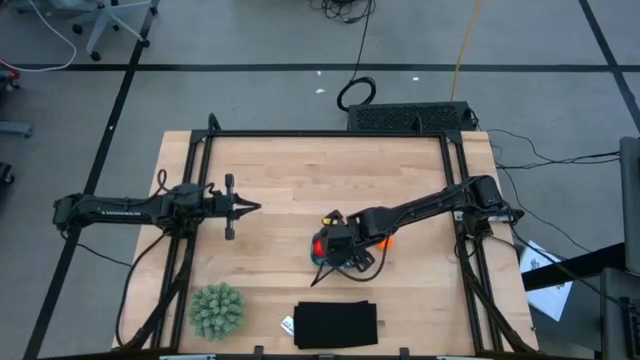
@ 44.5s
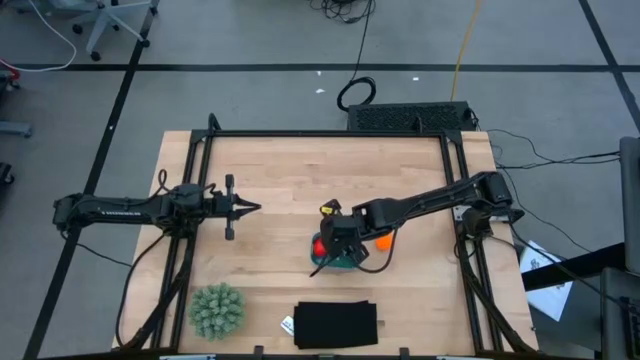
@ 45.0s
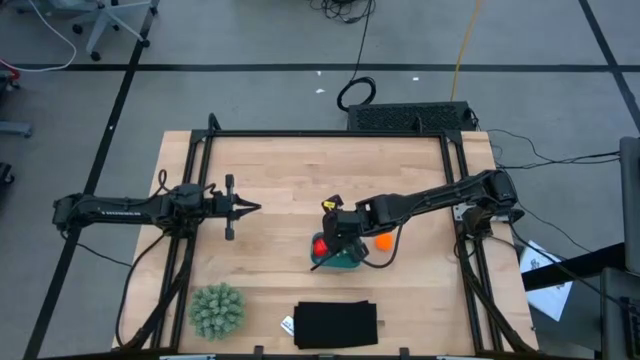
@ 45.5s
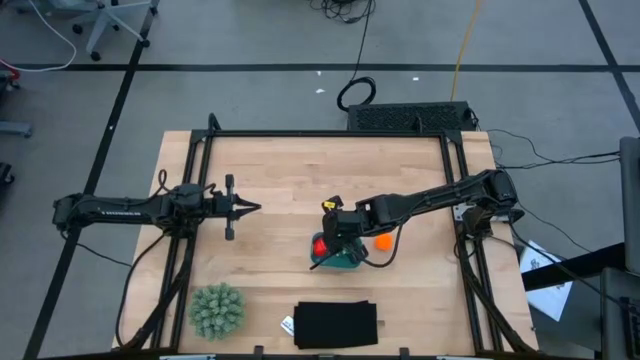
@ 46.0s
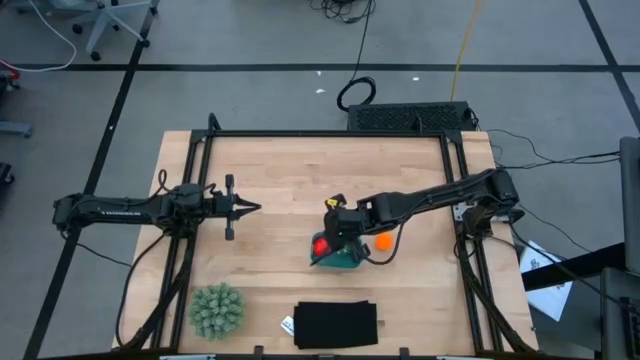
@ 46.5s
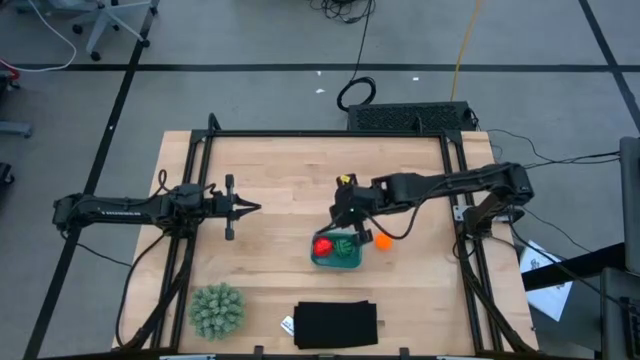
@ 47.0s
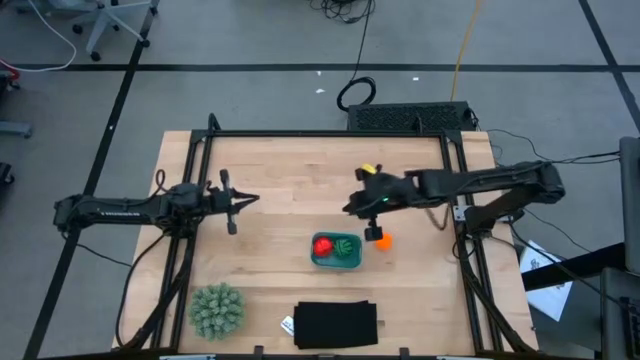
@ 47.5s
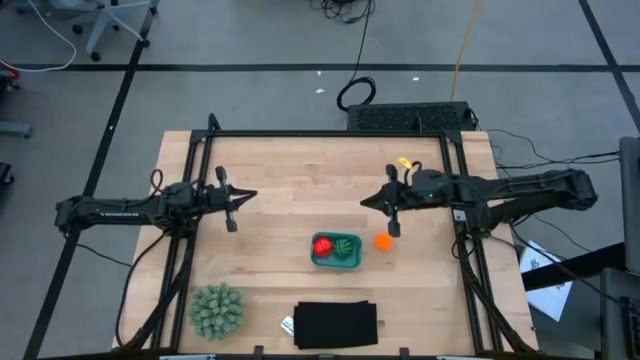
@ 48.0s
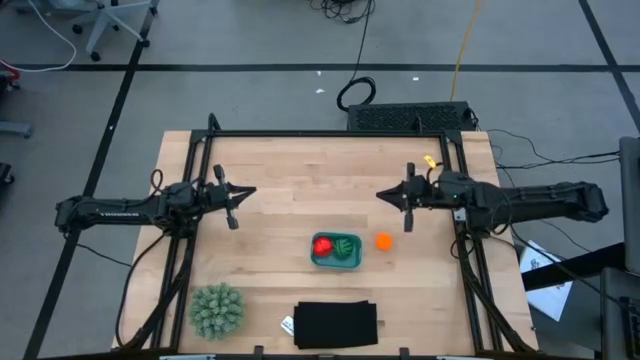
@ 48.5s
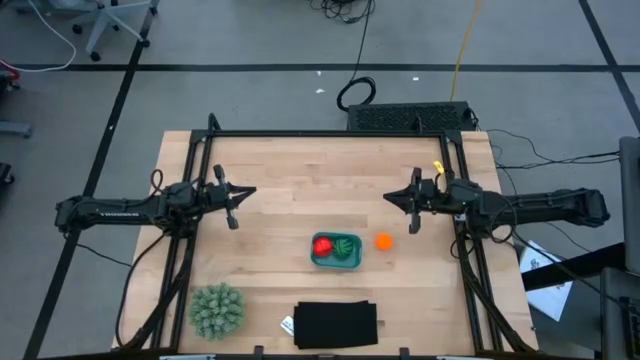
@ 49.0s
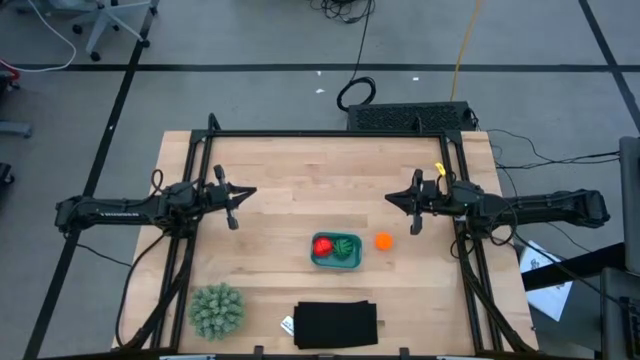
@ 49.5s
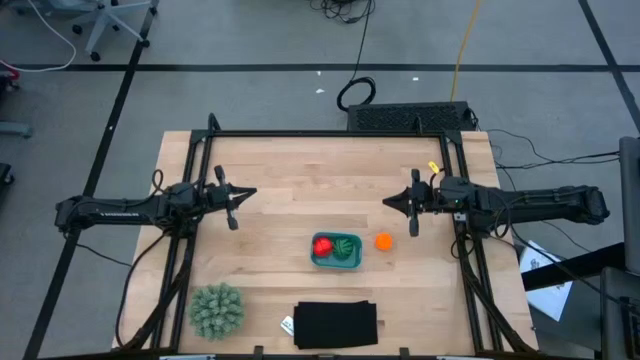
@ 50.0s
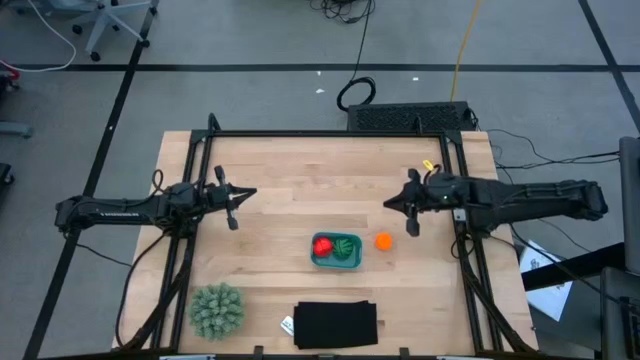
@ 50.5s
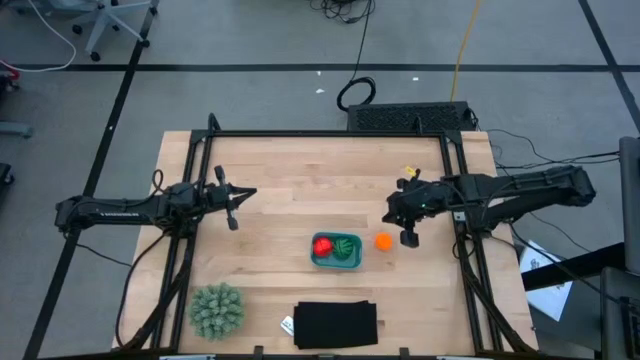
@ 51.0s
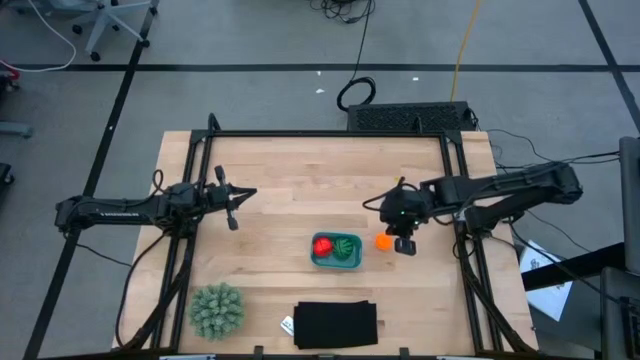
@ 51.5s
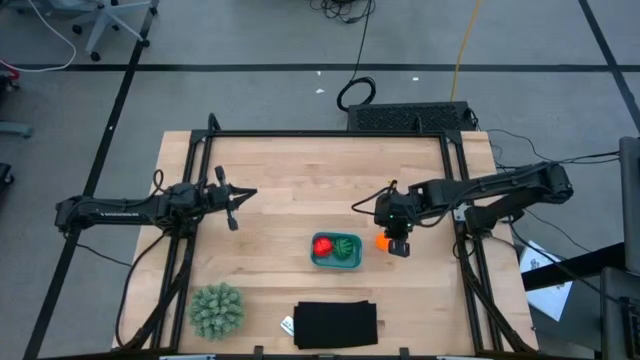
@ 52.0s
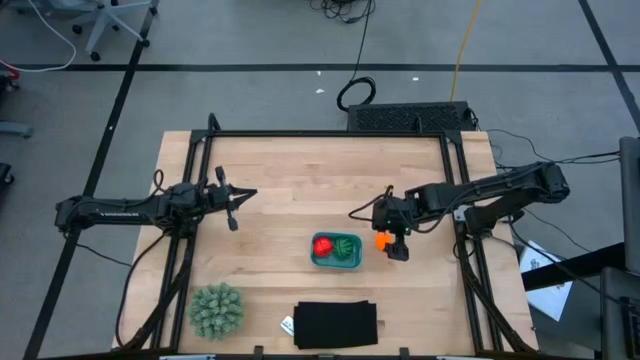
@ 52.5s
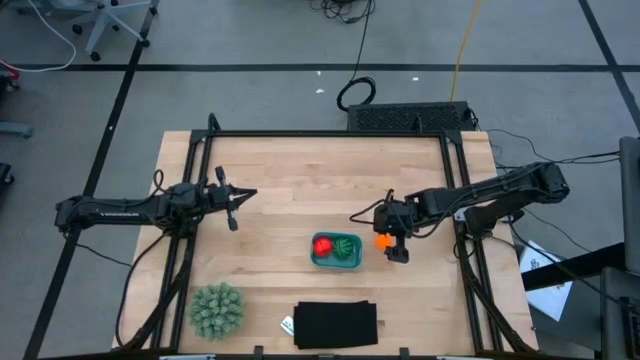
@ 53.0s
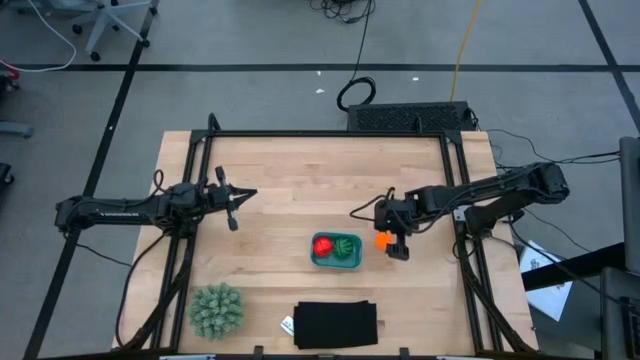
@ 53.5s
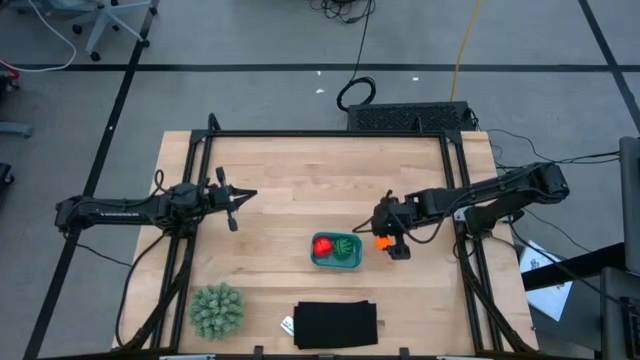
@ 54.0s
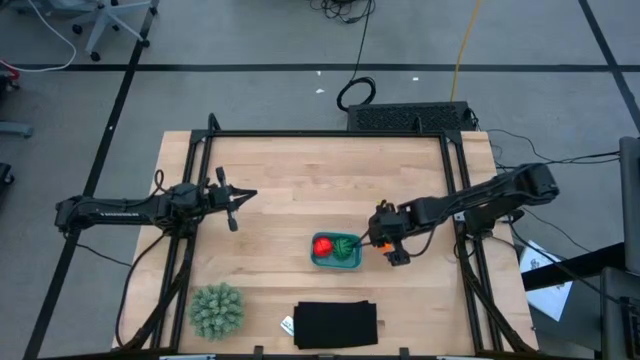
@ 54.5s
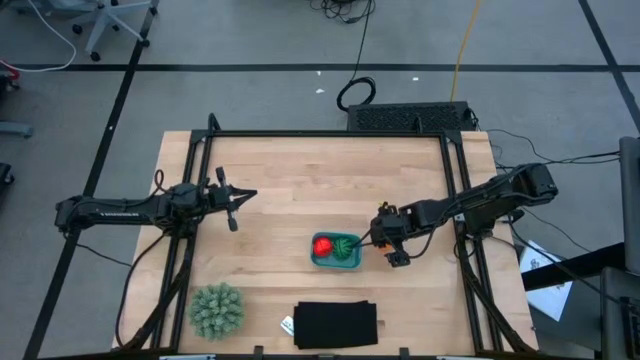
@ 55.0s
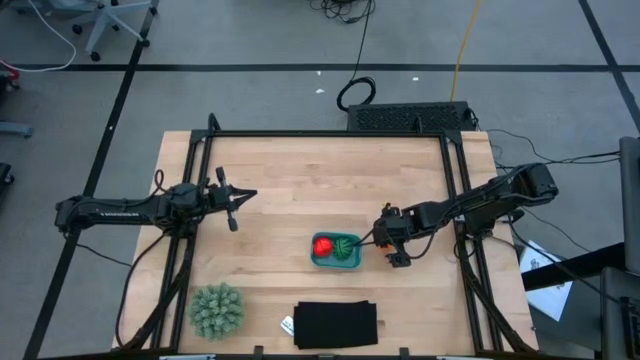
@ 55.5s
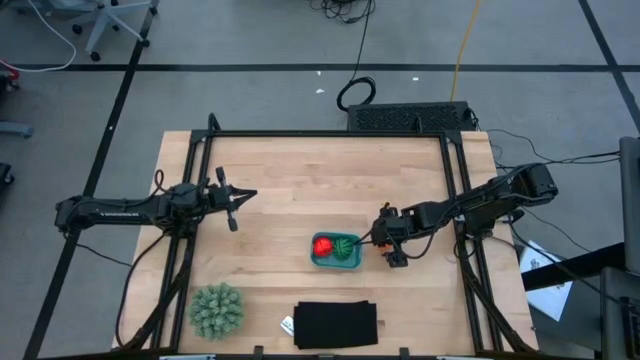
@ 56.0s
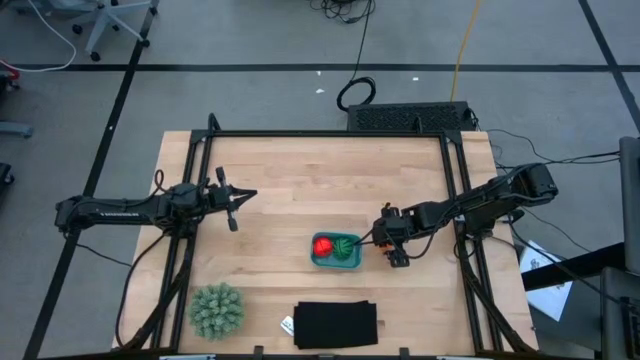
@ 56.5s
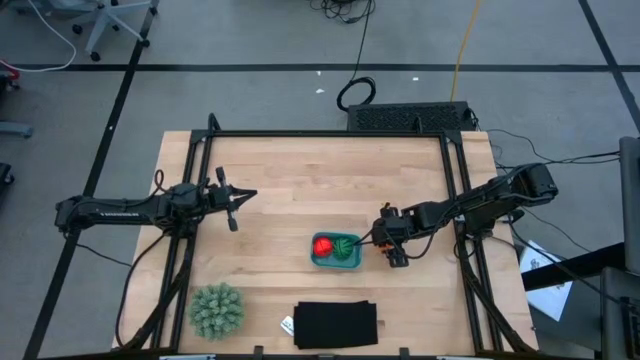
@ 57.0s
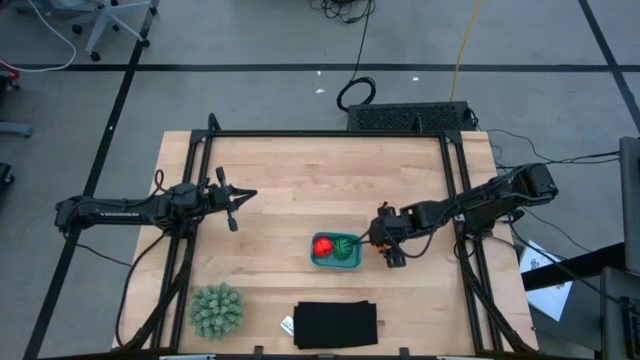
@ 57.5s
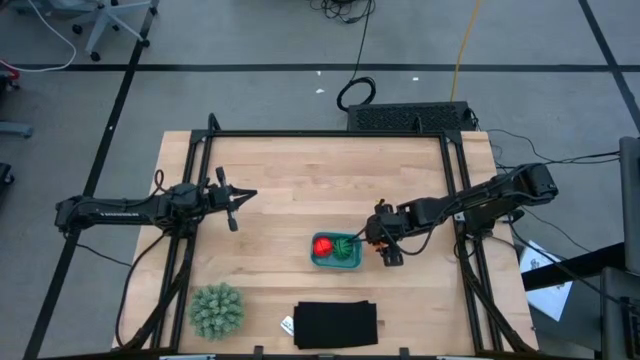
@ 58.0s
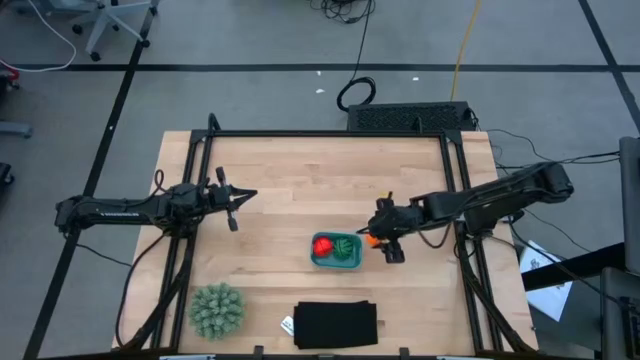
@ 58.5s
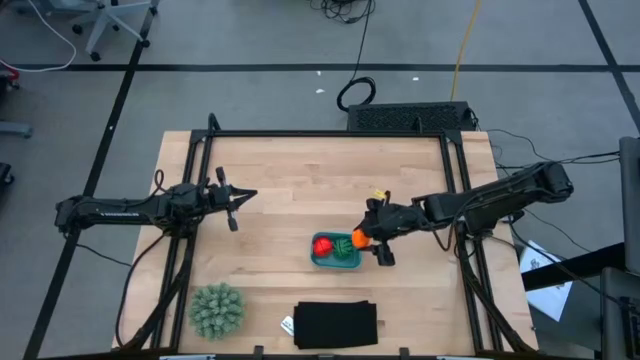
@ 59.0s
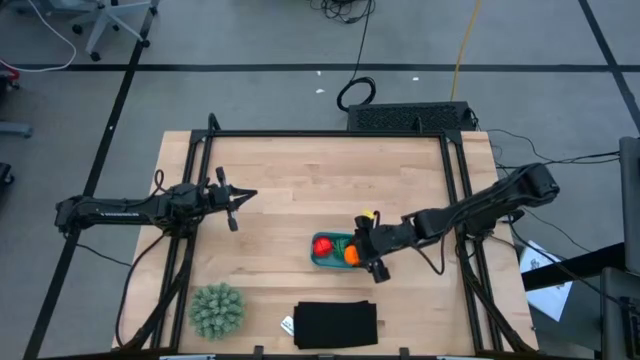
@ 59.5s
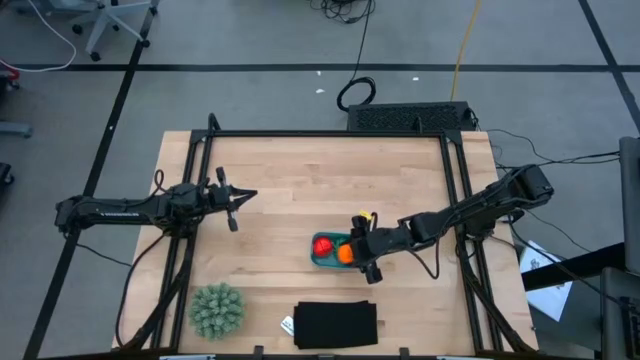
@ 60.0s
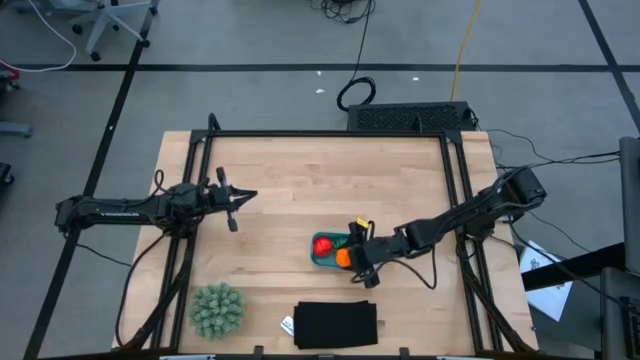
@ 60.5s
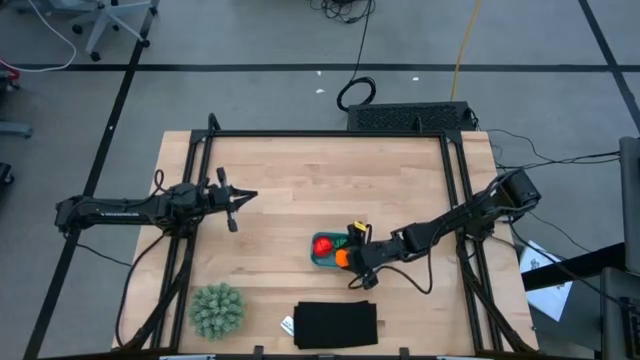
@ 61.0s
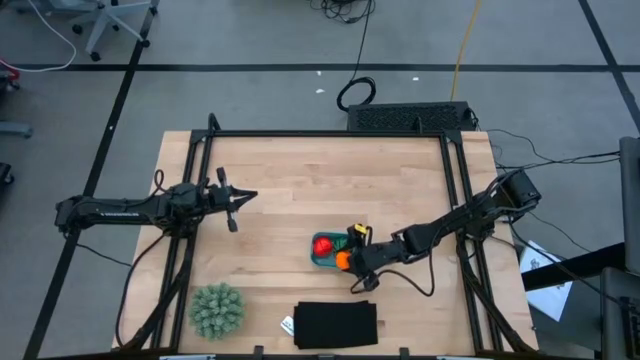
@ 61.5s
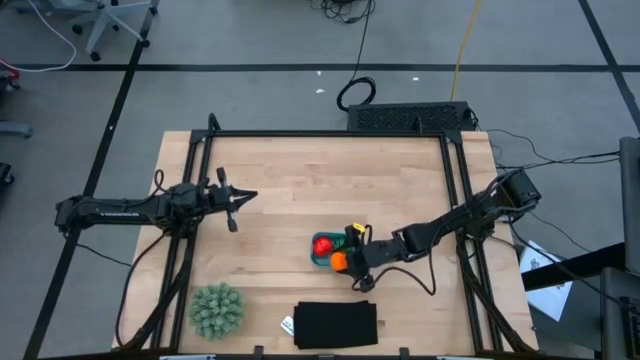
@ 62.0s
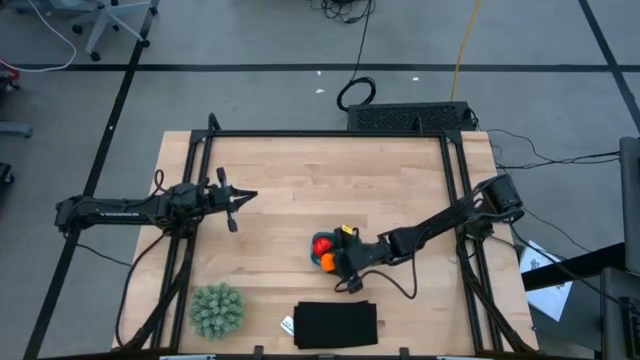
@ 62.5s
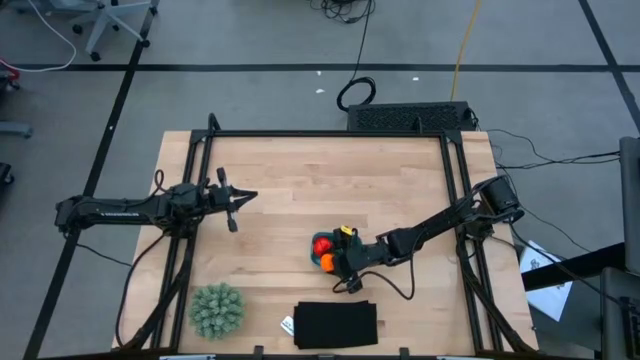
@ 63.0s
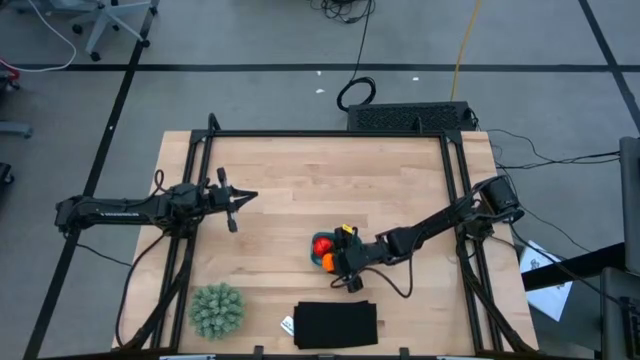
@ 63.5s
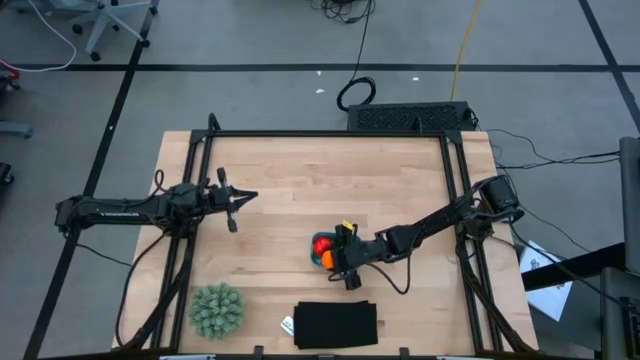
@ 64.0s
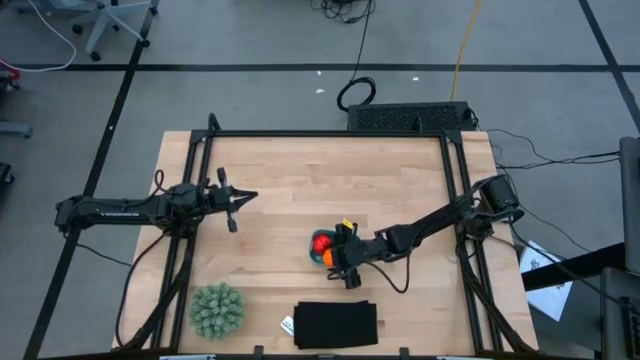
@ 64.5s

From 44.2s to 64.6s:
Task: Pick and placing Produce into tupperware
Put the orange pumpkin into the blue bin

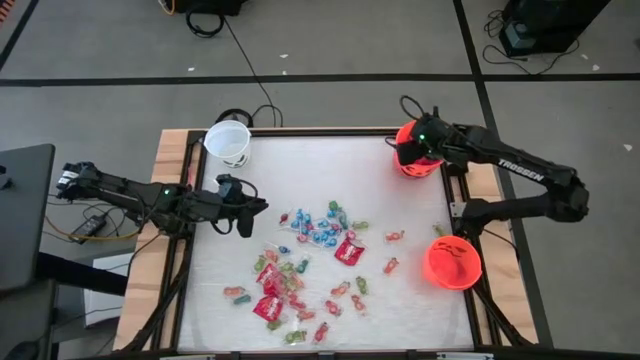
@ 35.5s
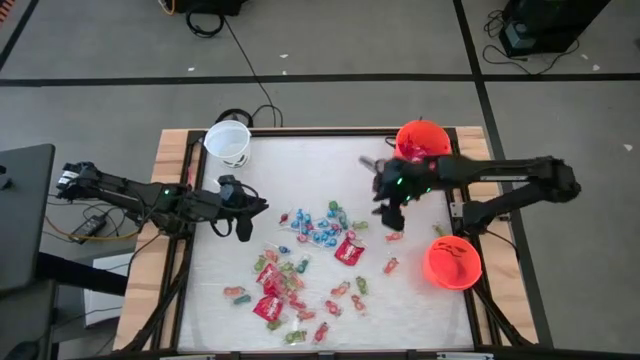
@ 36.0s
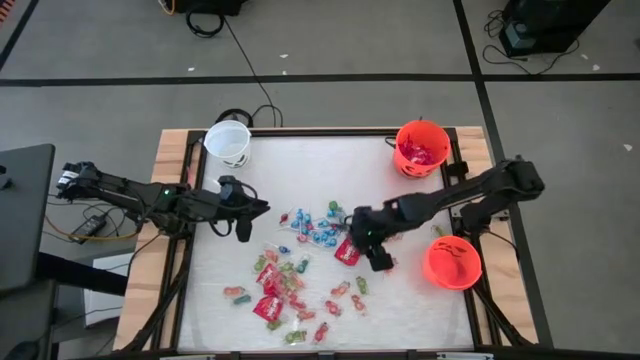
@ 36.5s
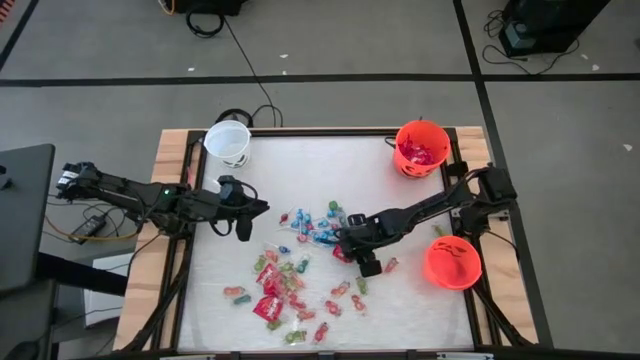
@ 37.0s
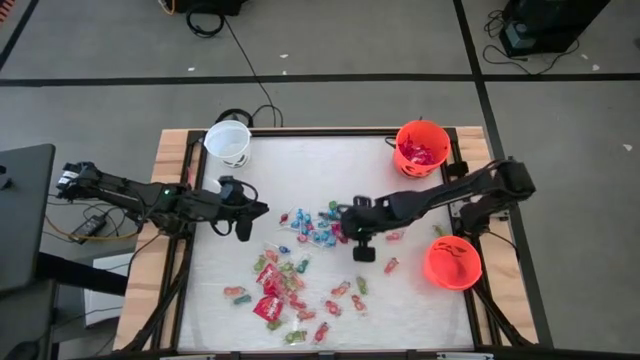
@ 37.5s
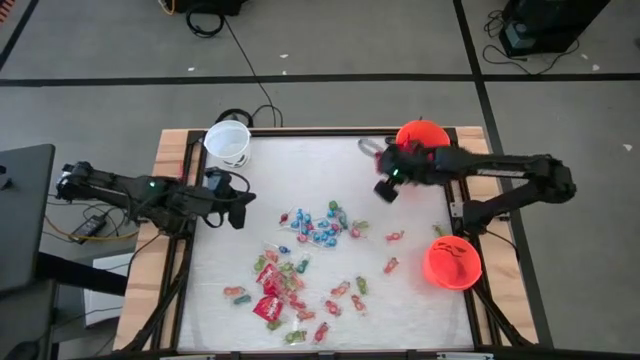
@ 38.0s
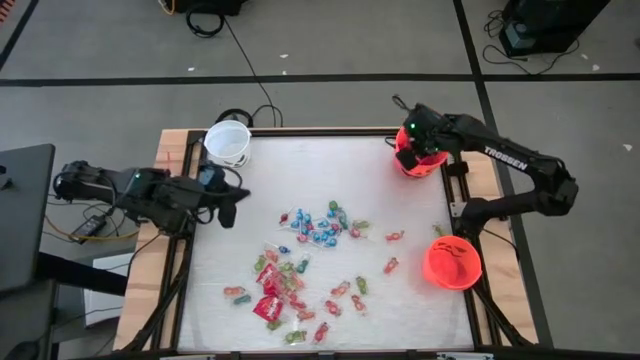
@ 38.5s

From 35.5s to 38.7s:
Task: Sort candy by brand, put in halloween buckets
Put the red candy into the top orange bucket
